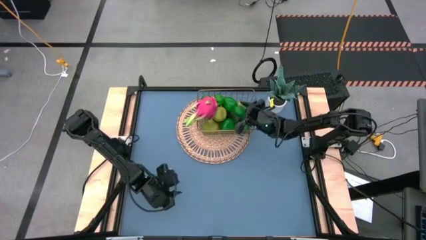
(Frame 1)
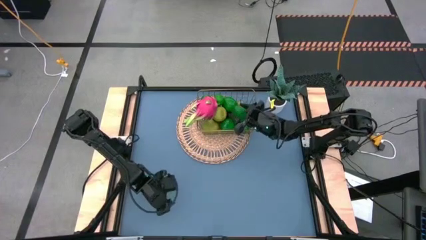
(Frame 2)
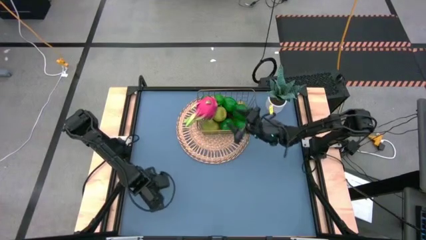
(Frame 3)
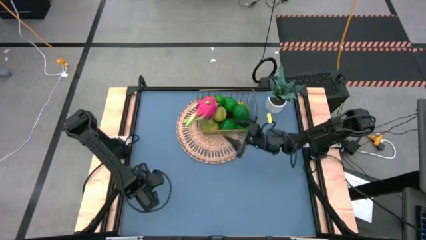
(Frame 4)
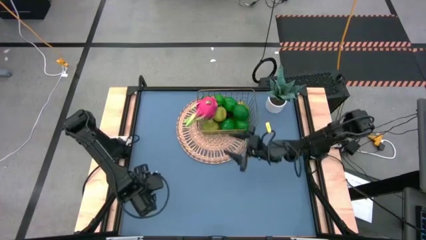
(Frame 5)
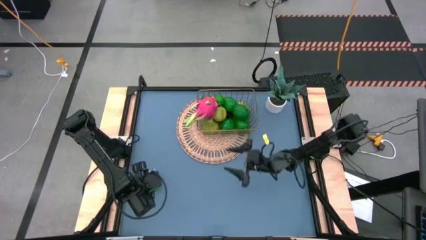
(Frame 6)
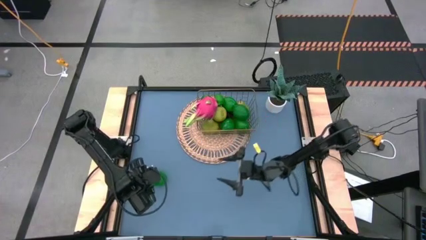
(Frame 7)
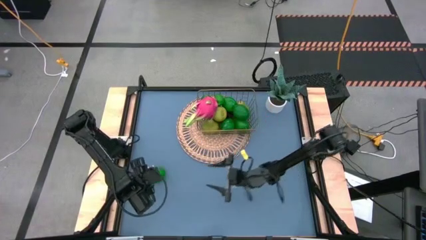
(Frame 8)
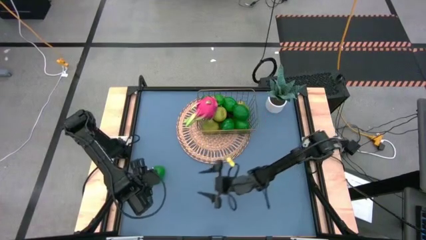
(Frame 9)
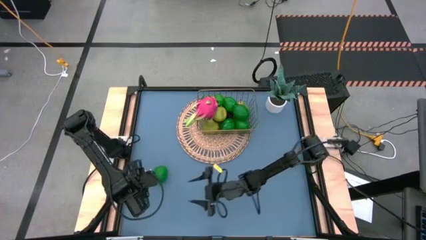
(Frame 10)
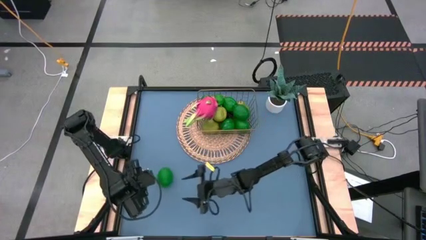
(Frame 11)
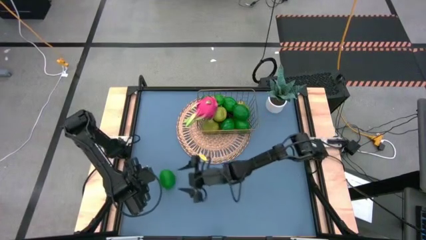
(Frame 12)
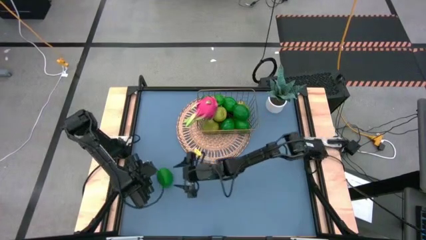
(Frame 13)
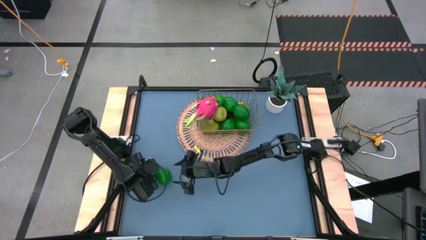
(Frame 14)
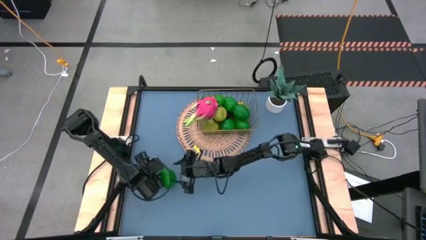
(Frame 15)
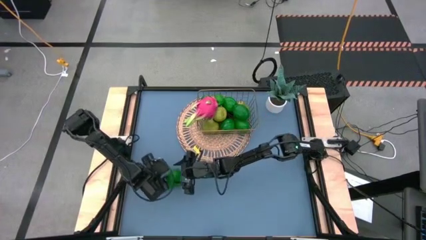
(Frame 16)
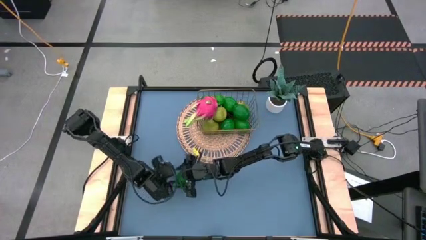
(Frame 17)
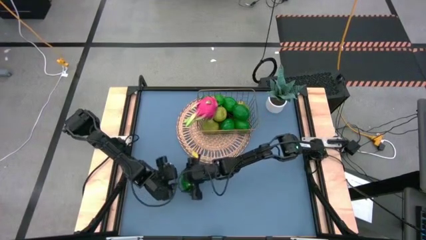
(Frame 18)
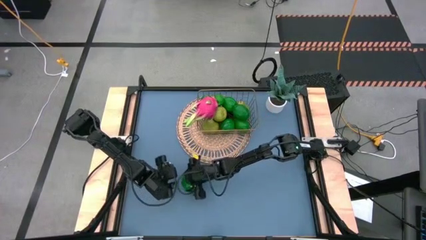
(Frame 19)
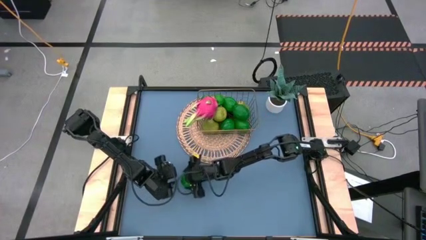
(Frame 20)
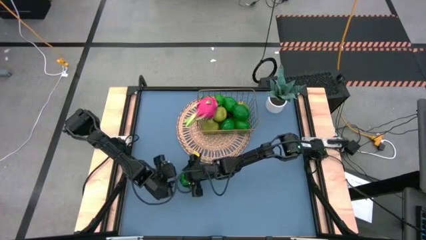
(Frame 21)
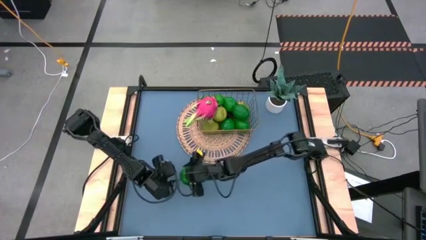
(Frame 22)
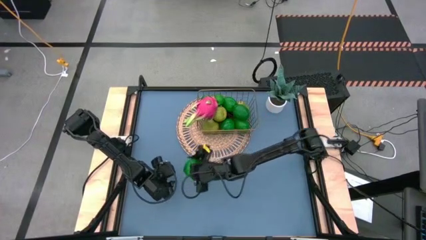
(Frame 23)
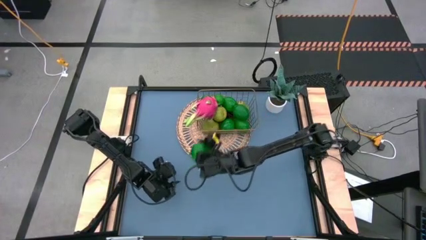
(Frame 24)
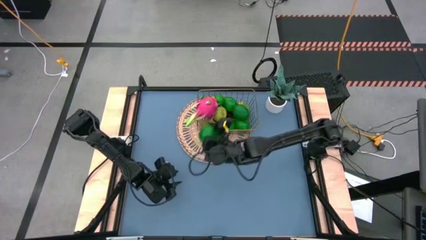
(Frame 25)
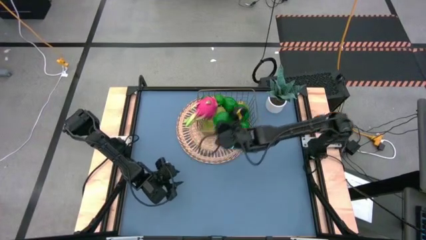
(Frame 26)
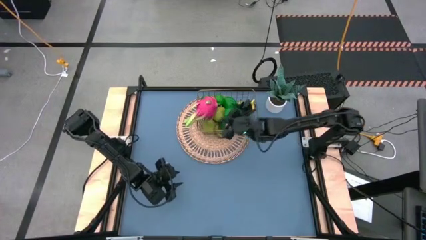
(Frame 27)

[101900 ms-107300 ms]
Task: Build produce basket
Put the green lime into the wire basket

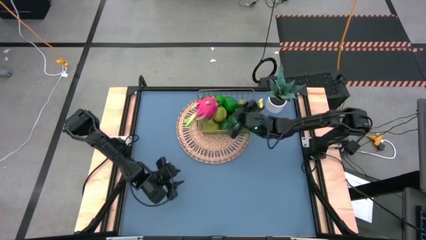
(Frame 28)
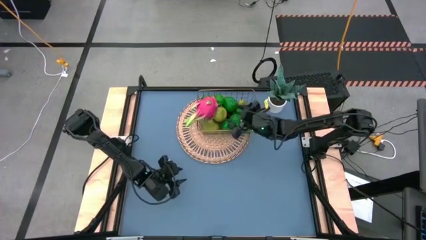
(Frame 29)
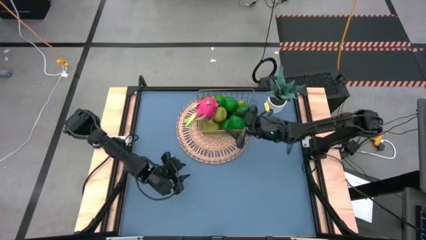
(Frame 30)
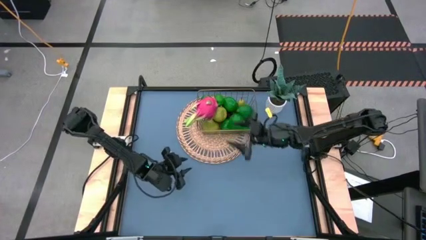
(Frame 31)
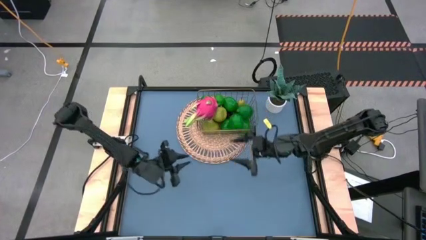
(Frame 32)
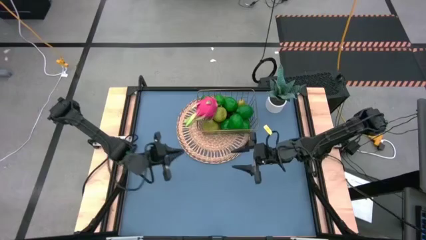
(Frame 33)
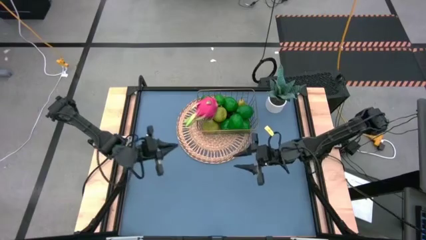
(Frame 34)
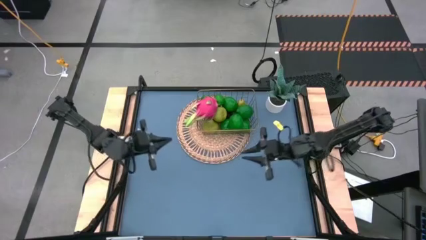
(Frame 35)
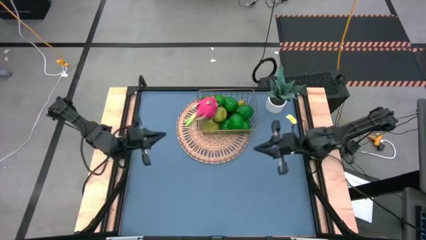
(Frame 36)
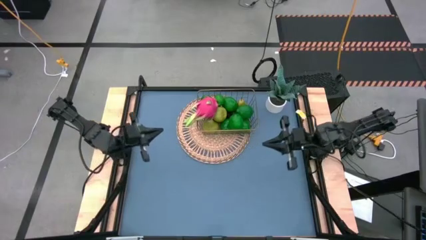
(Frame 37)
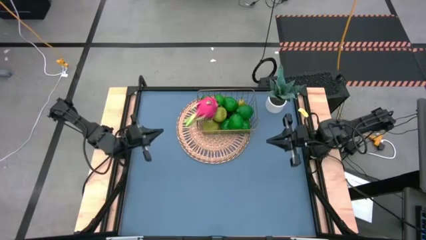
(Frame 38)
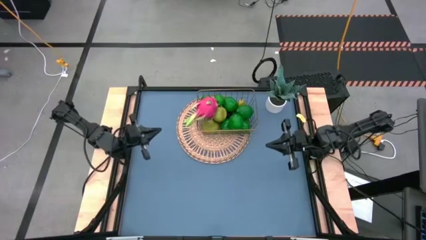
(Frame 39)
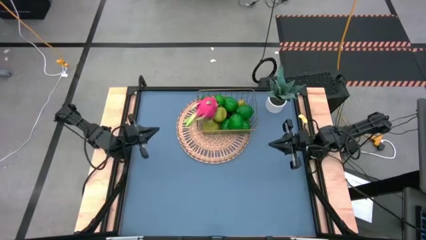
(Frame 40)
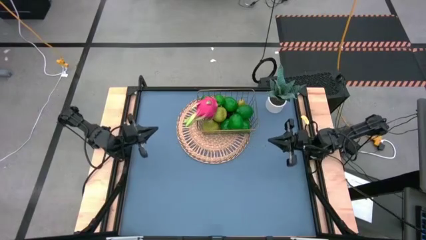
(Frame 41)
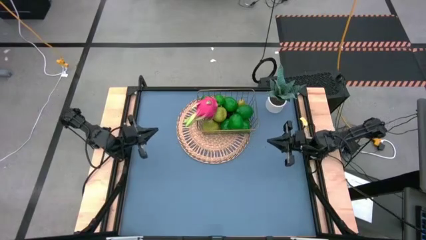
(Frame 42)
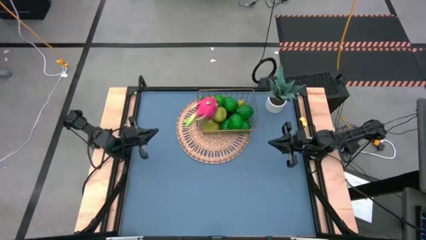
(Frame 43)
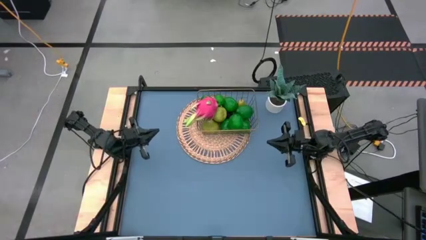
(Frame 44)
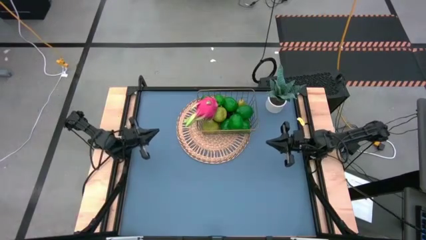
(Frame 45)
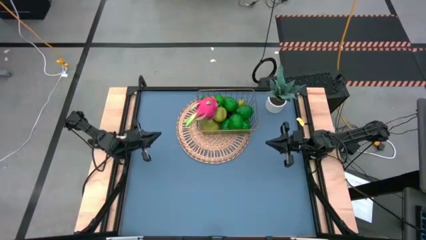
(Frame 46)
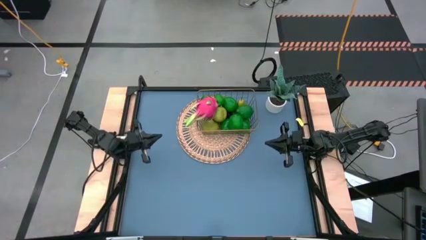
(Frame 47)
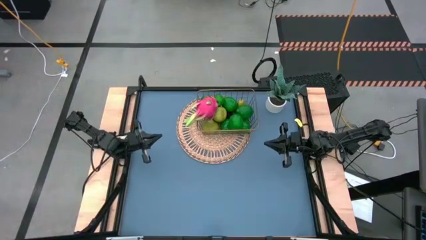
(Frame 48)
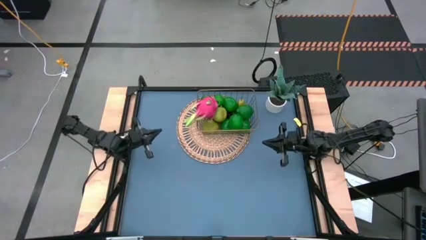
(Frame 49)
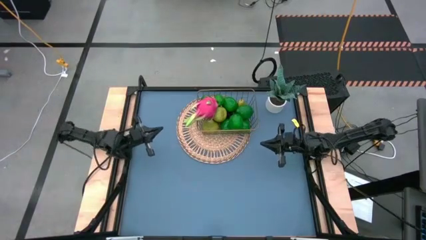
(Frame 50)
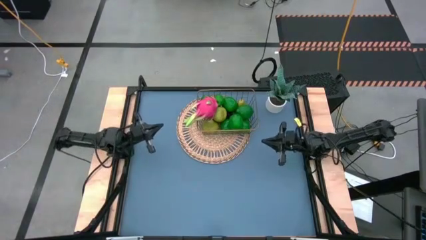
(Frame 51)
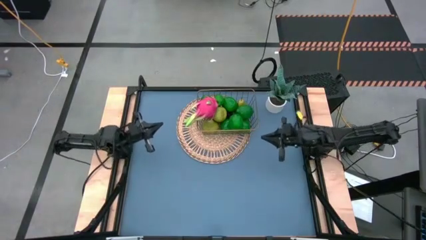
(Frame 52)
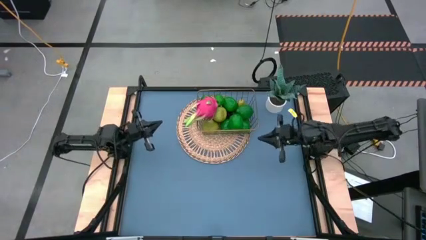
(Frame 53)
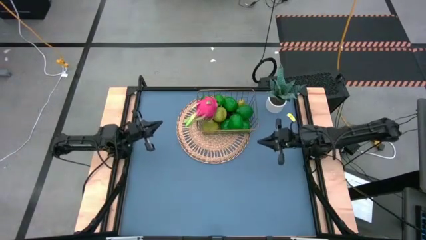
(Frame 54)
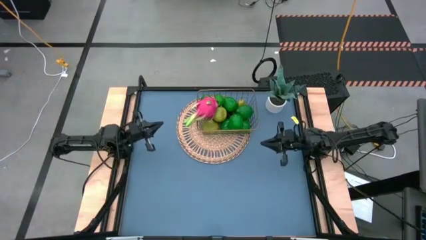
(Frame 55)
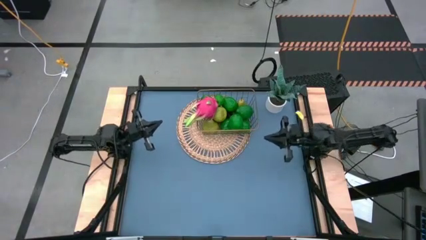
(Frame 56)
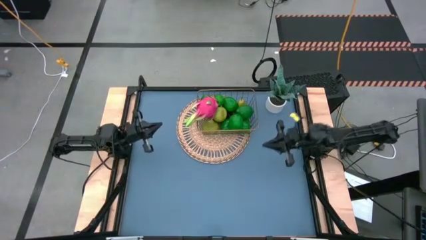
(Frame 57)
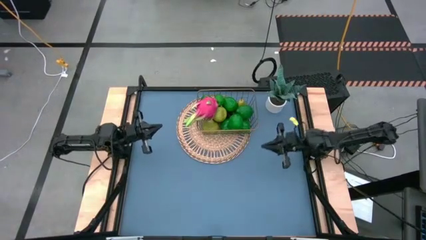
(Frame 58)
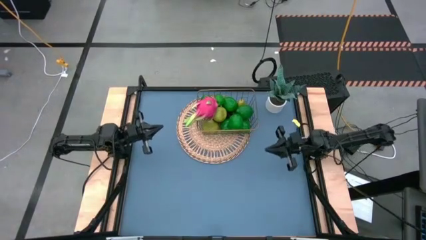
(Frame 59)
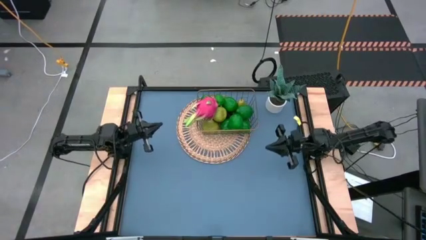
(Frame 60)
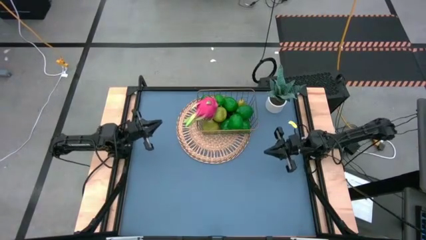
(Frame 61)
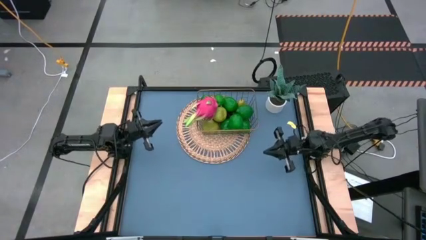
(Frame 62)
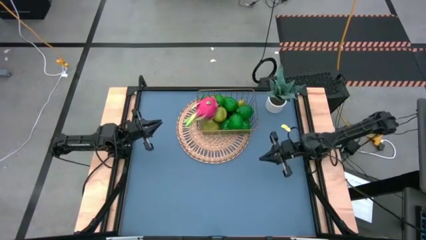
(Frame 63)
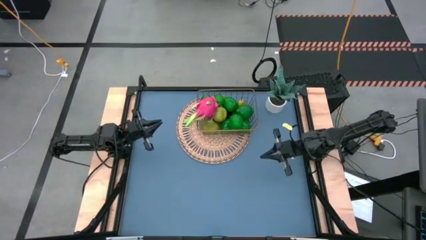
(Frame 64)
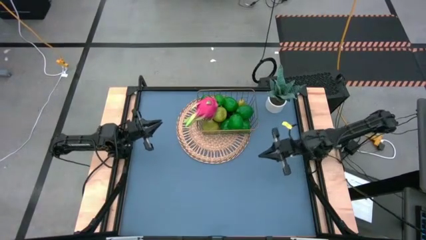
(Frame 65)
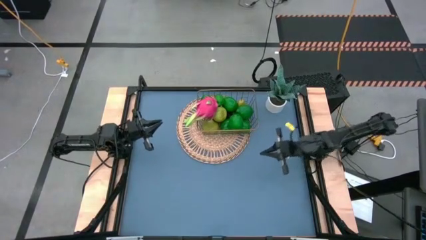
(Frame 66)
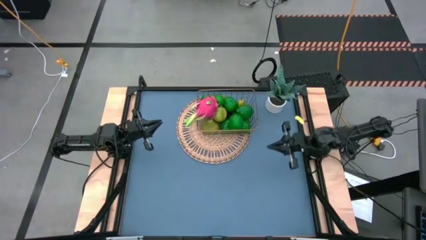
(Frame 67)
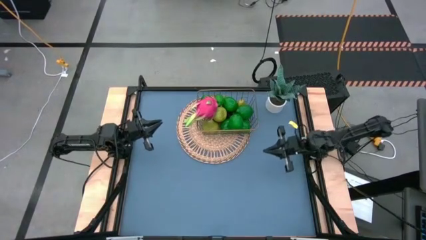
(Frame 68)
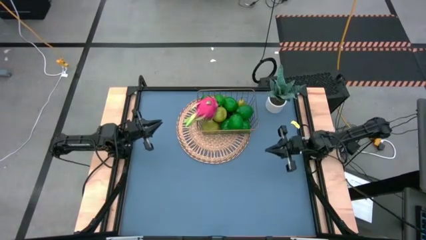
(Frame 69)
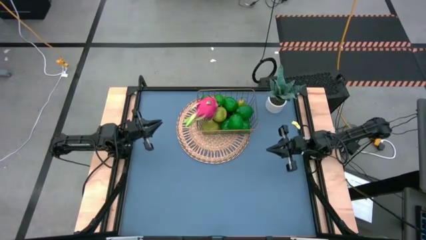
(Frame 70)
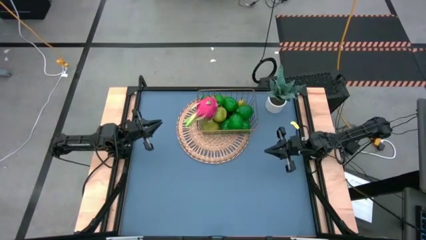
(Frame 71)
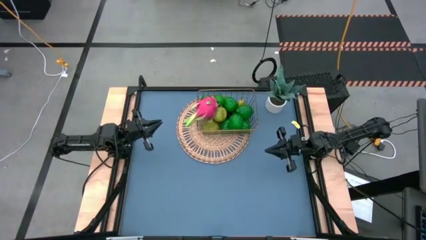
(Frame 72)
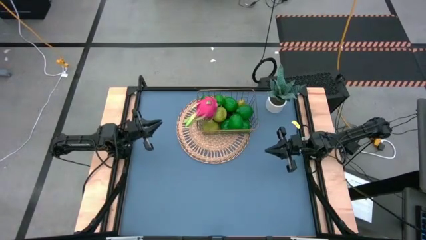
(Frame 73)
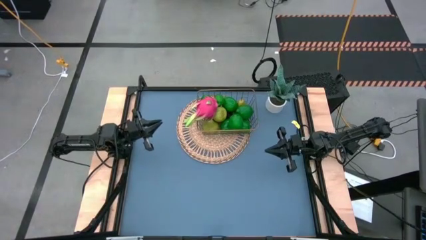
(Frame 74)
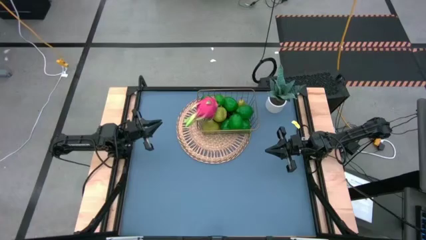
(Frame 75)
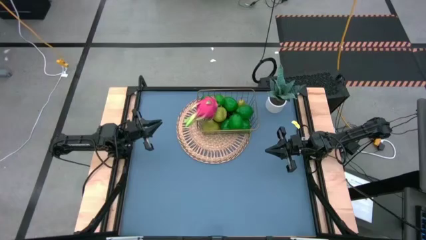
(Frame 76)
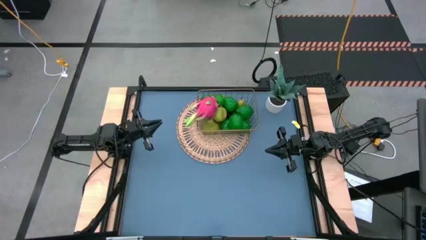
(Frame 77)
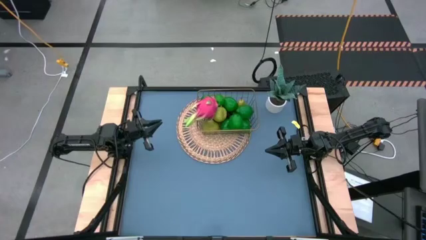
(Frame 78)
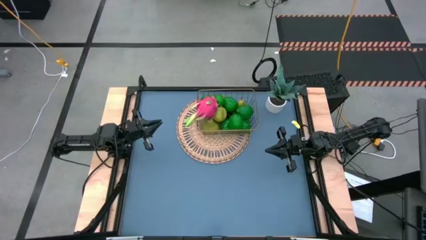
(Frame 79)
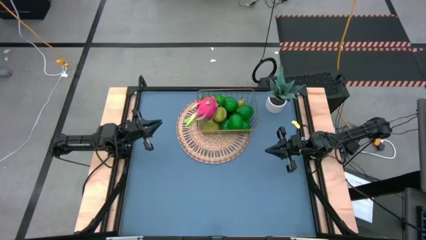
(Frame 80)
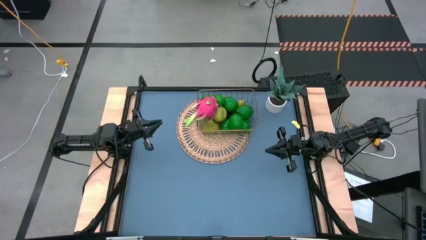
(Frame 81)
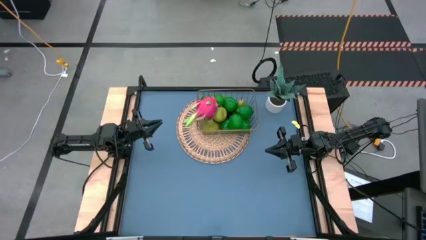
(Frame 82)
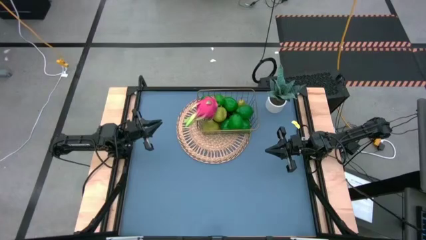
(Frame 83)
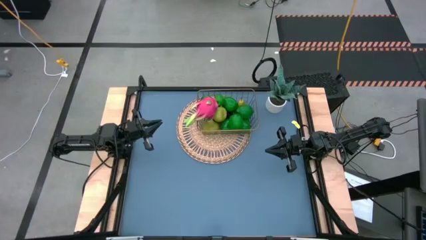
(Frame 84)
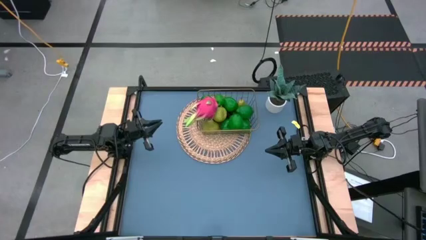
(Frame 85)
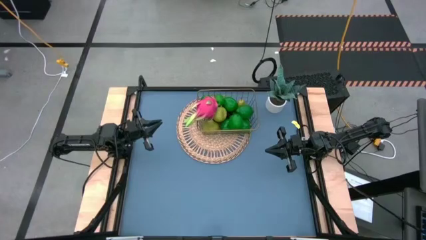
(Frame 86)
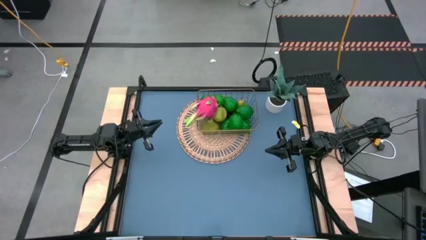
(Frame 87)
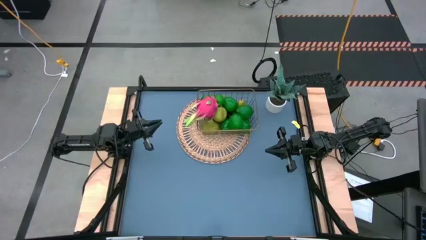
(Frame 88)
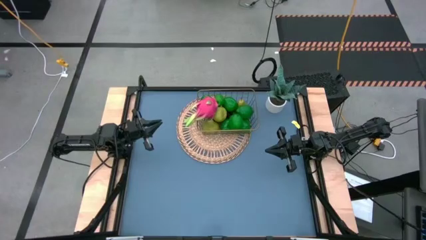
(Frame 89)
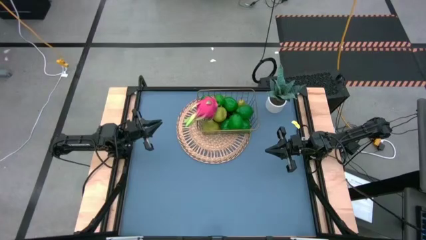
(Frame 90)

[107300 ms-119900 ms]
Return to Home Position
